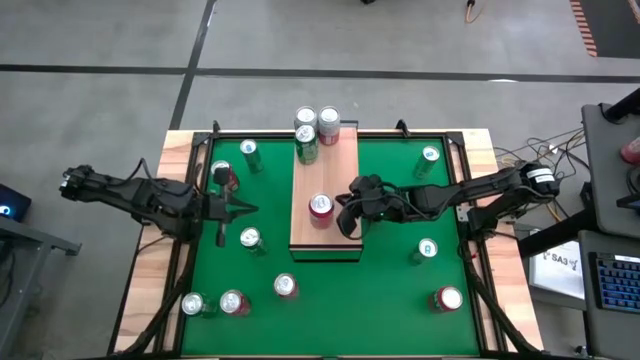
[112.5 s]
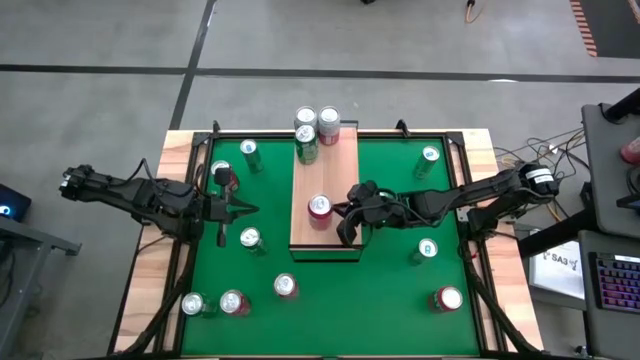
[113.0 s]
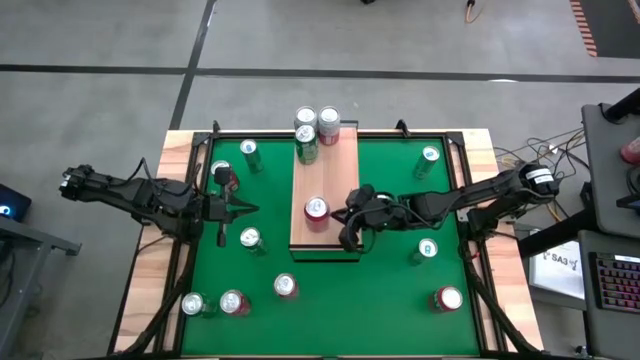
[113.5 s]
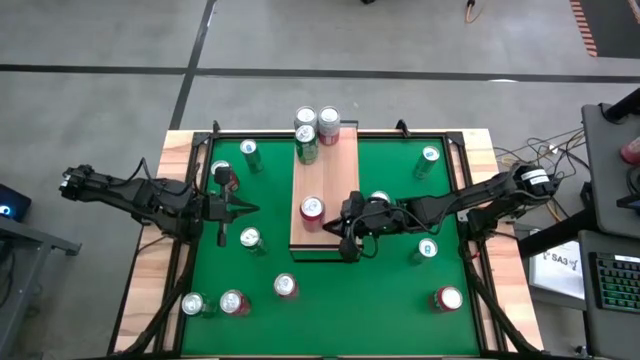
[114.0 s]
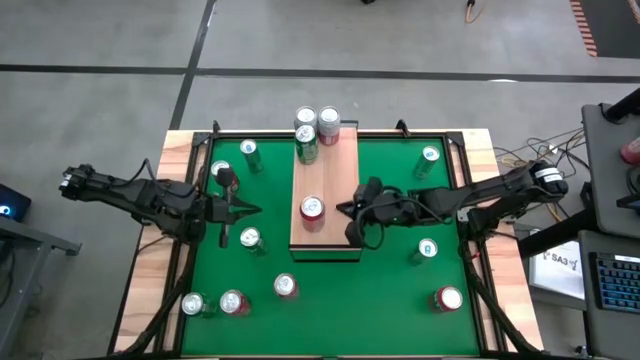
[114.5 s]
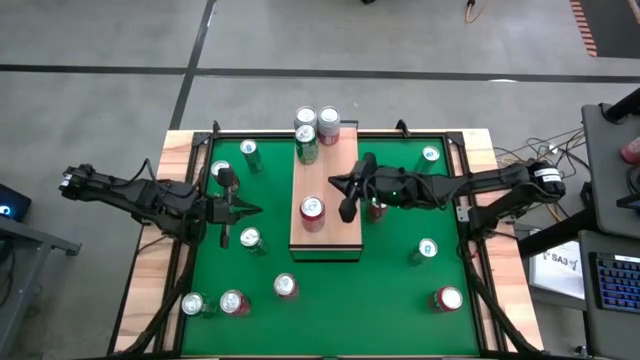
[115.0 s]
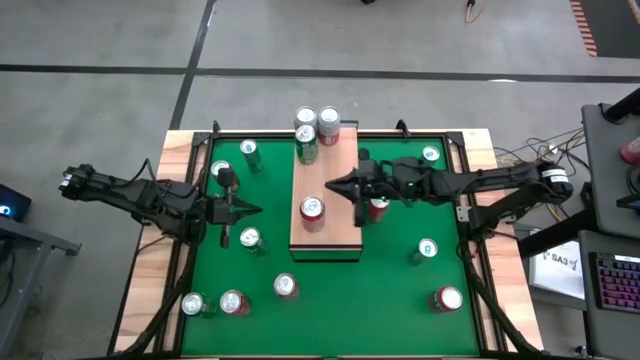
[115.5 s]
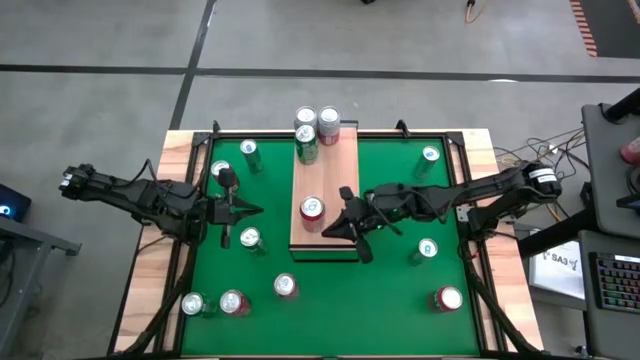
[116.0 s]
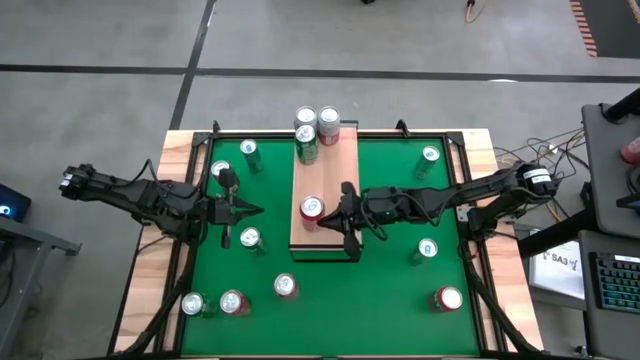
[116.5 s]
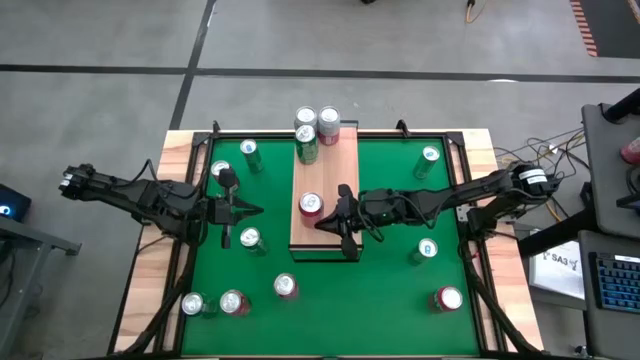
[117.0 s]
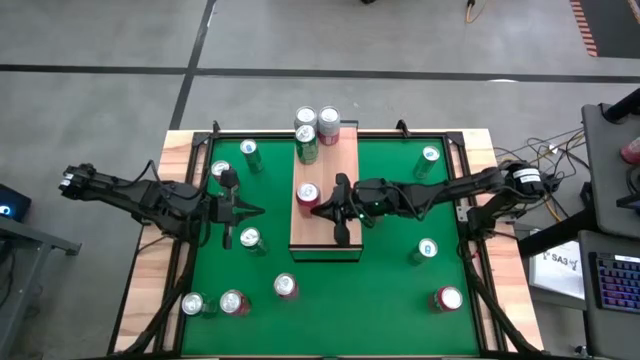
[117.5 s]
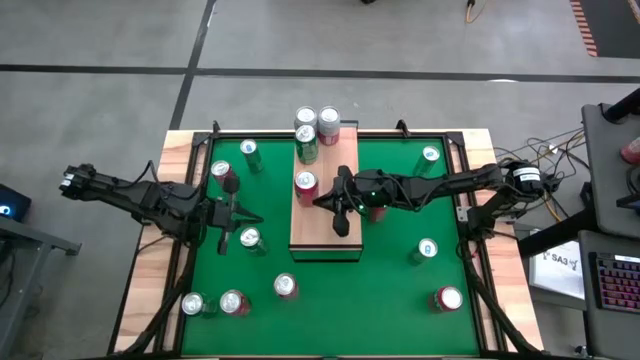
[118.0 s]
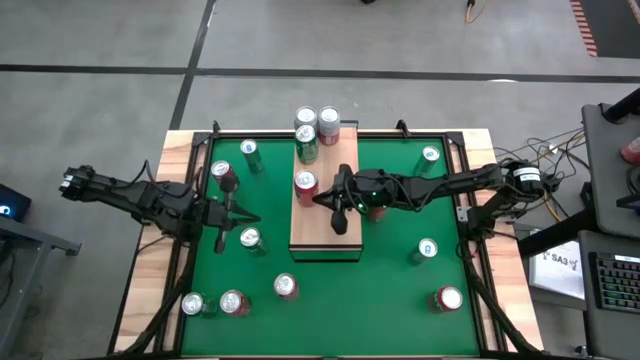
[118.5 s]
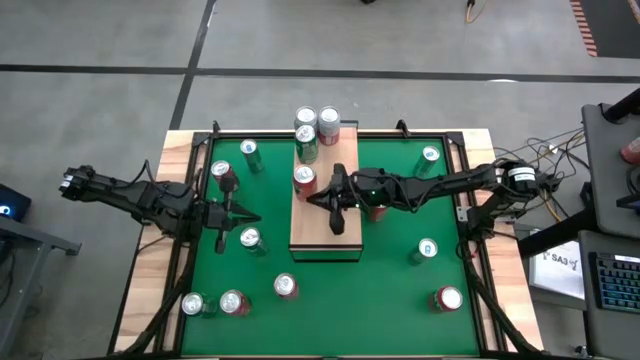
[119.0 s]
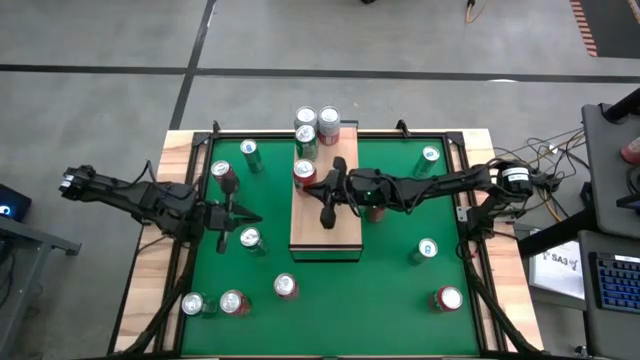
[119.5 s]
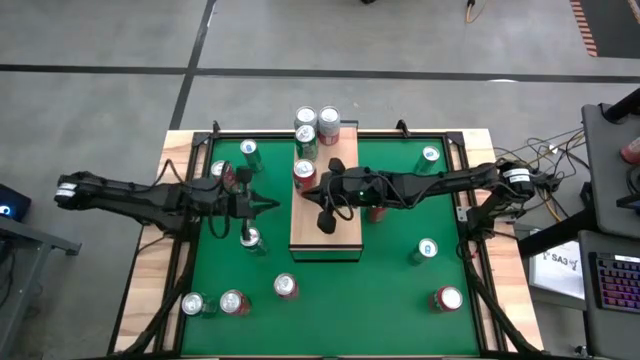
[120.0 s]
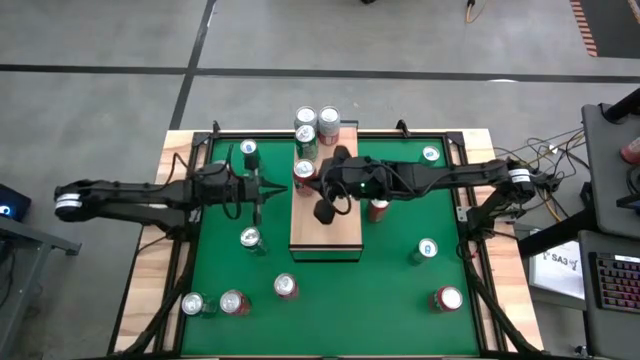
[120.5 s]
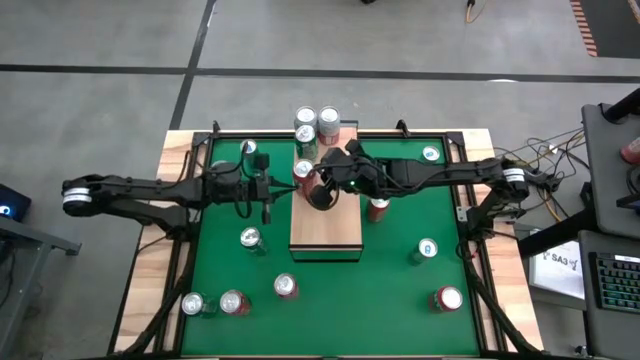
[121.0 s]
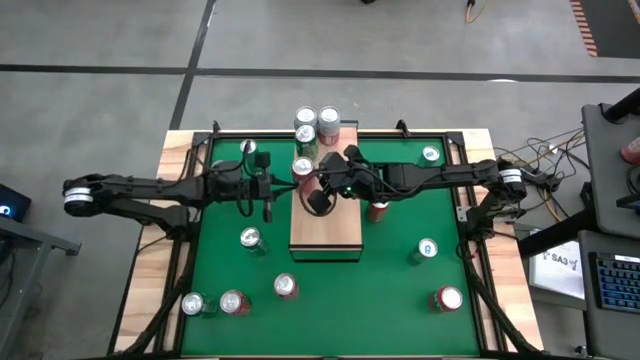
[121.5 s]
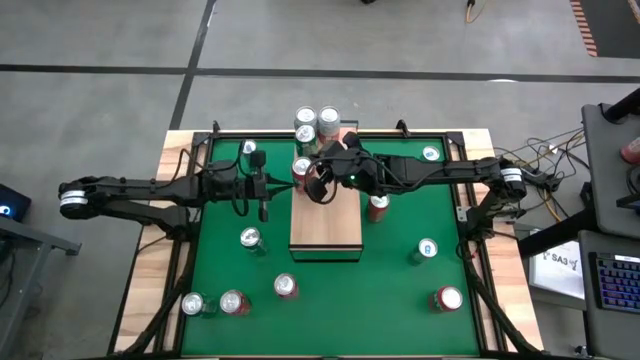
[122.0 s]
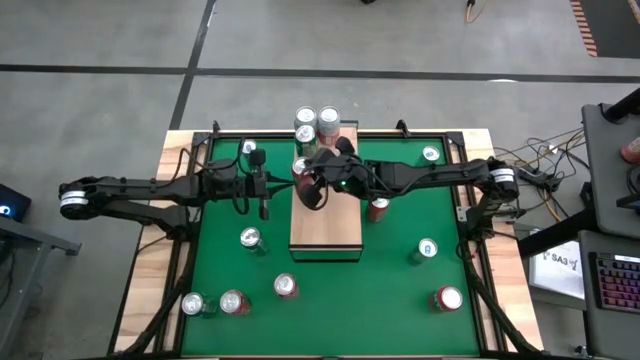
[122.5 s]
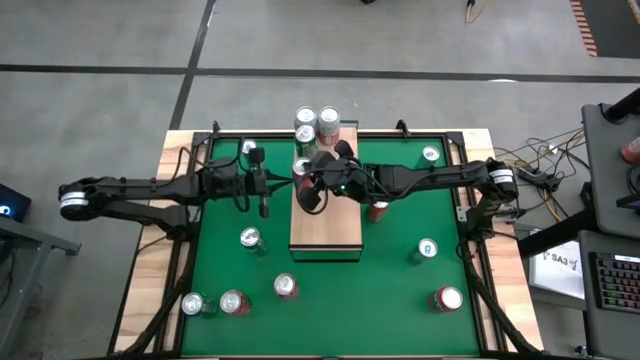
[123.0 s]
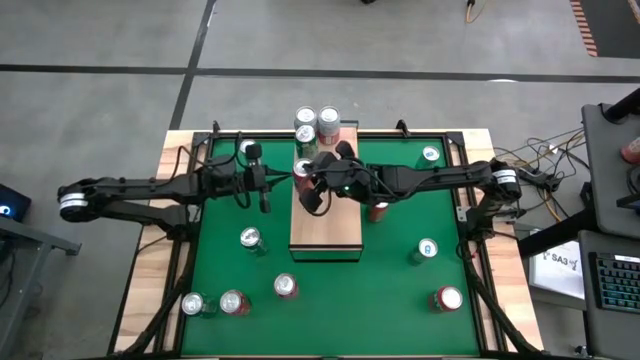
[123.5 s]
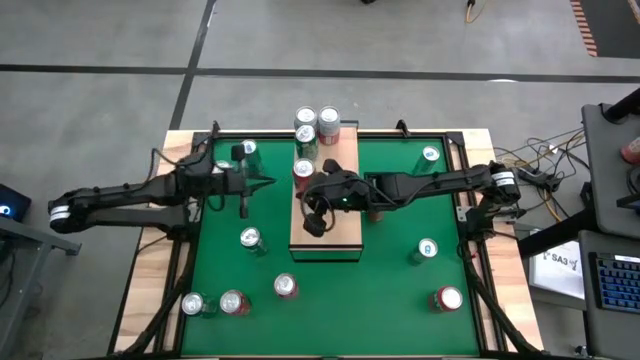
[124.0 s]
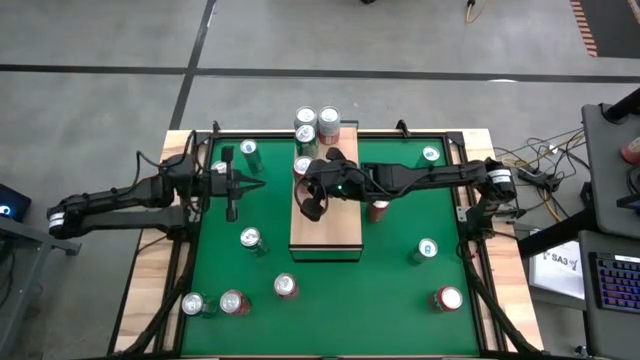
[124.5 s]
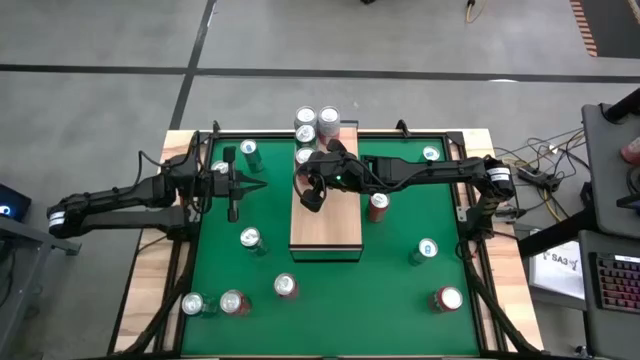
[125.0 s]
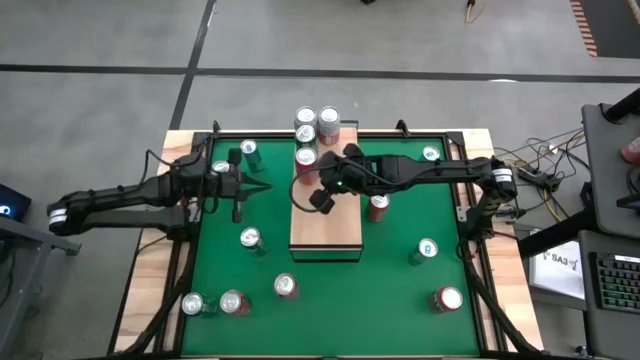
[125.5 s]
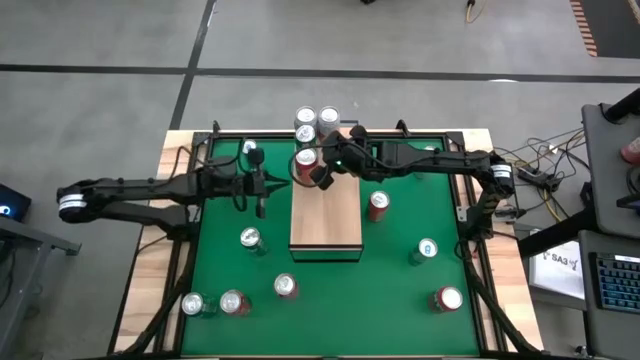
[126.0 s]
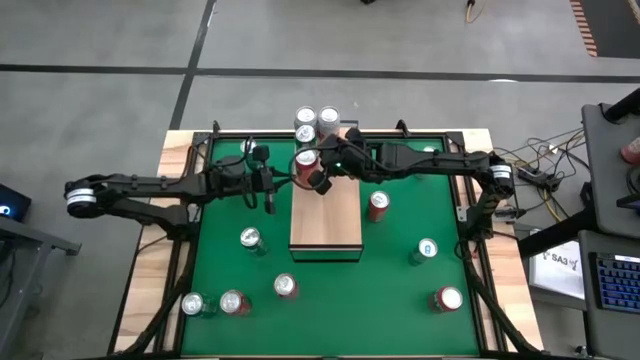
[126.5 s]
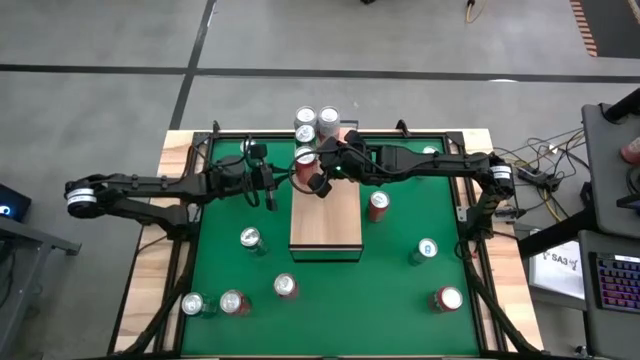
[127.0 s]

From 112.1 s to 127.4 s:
Task: Place canned beverage on shelf
Put the orange can on the shelf

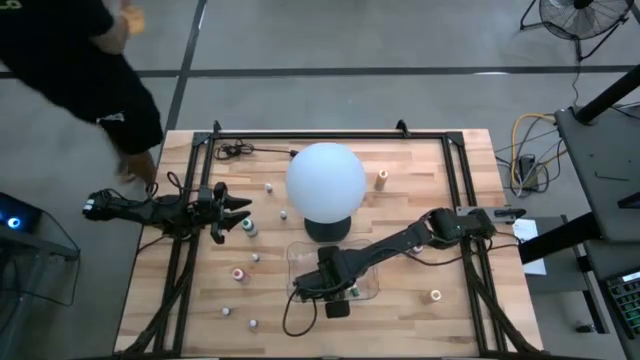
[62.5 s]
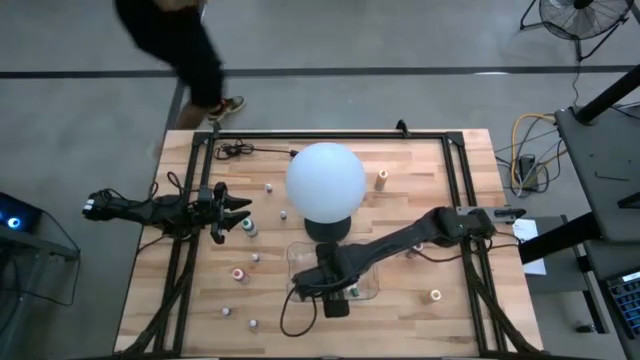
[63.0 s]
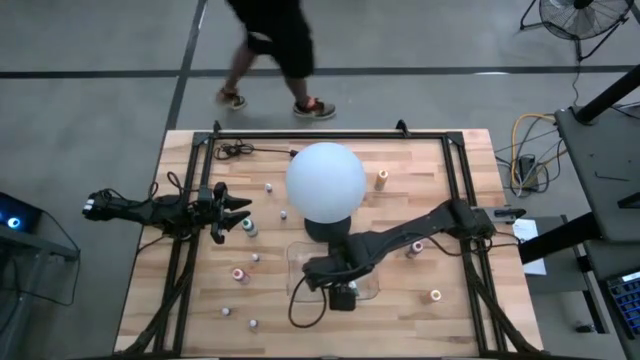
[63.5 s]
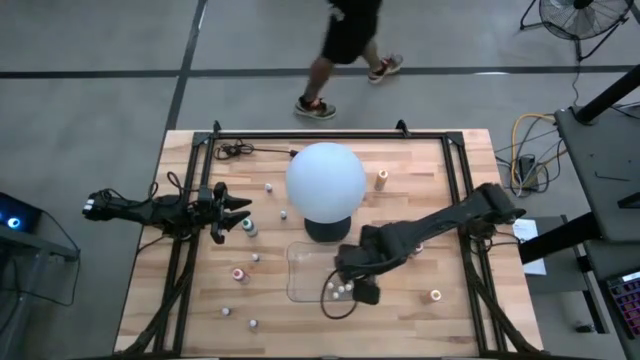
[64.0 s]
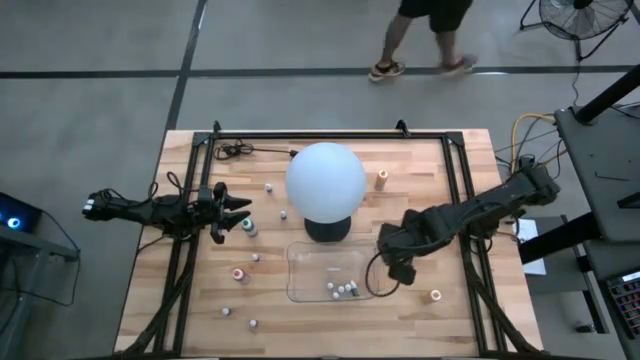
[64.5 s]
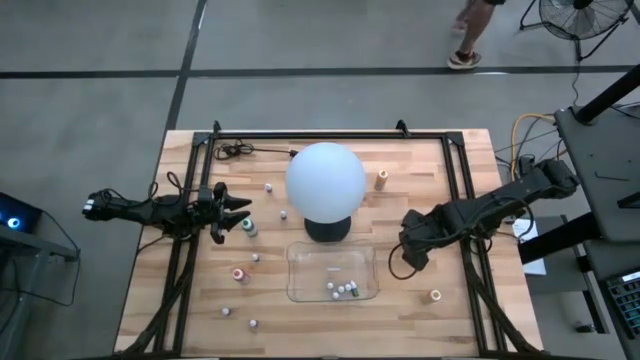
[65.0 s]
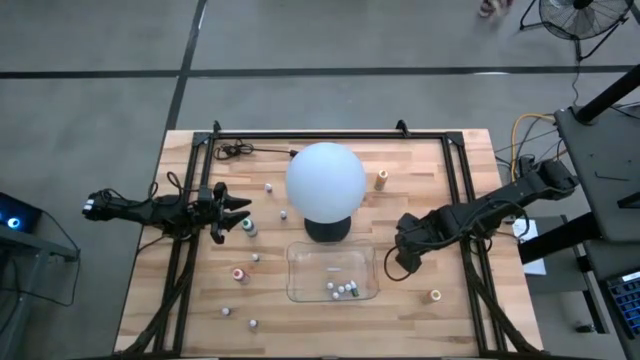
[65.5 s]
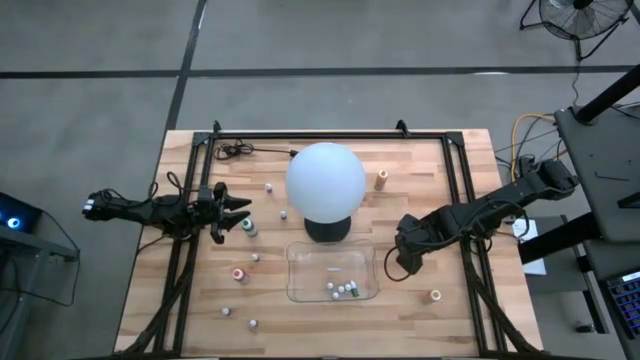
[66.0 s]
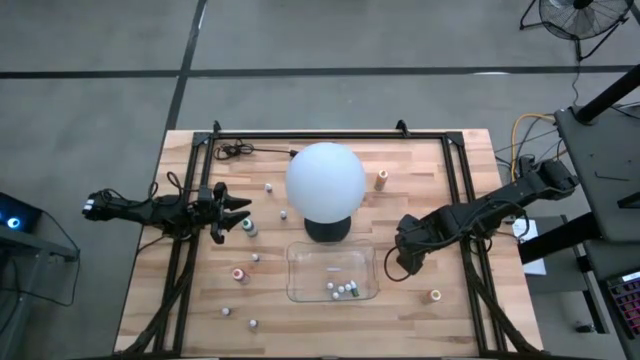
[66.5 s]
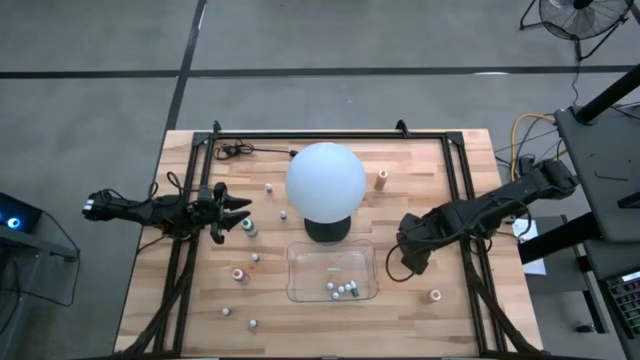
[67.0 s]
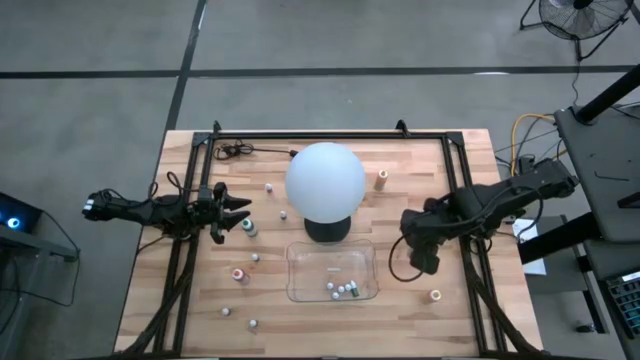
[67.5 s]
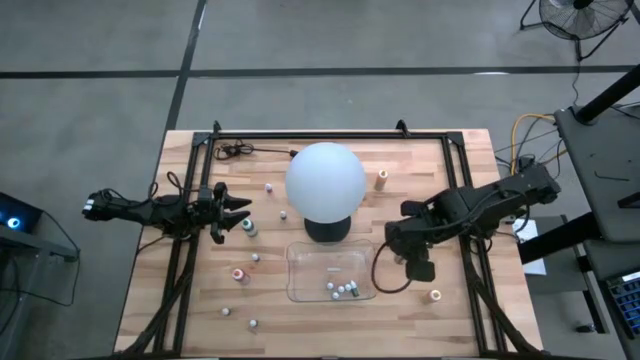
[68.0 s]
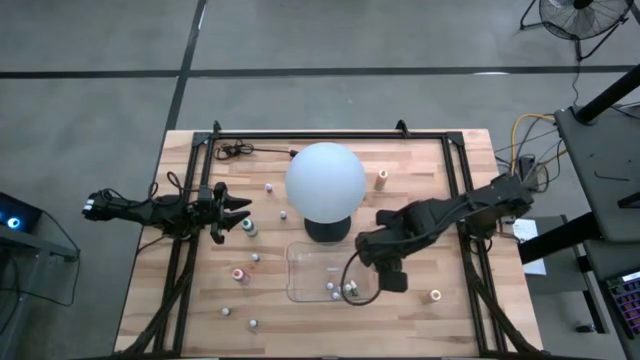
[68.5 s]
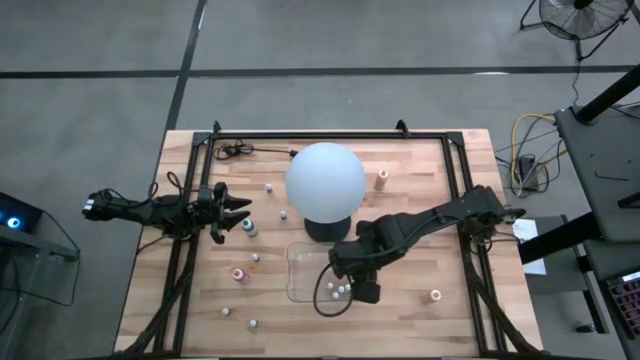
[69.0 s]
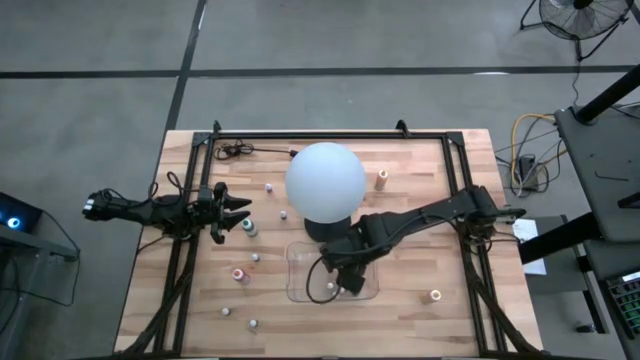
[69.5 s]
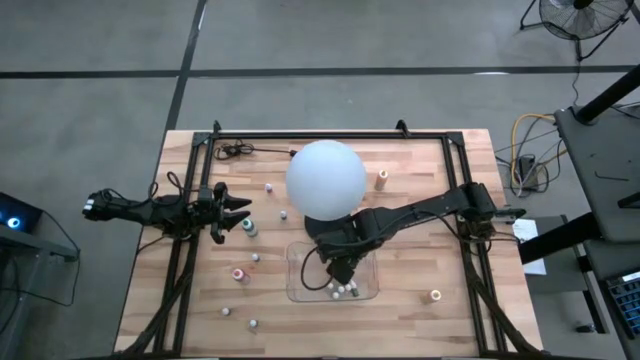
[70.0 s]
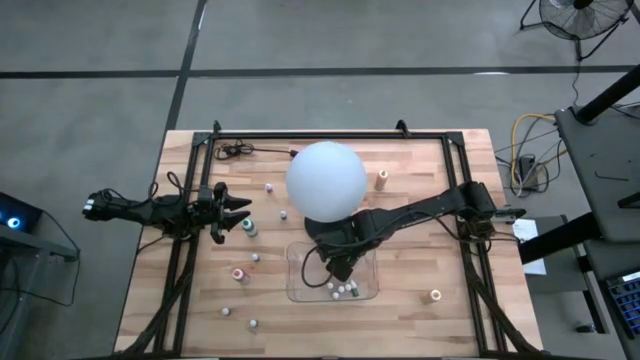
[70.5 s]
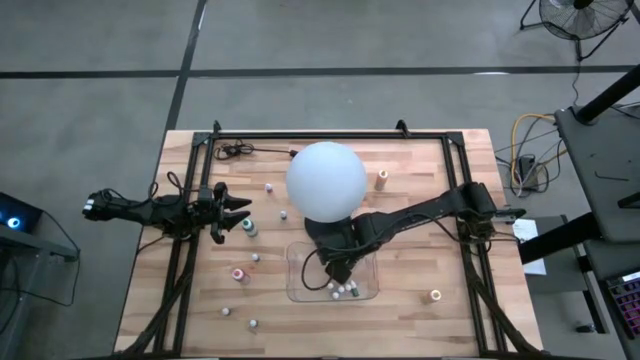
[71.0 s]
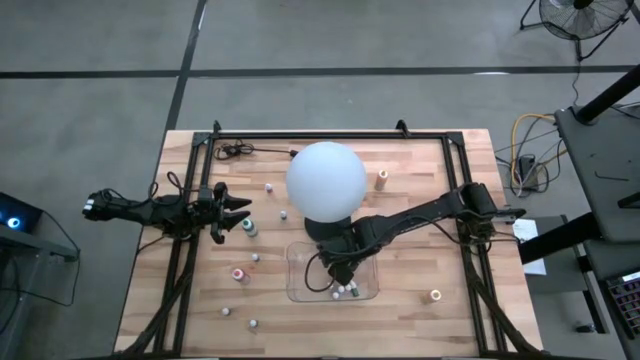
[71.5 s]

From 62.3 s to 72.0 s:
Task: Pick & Place food coloring
Put the big red food coloring bottle into the transparent bin
